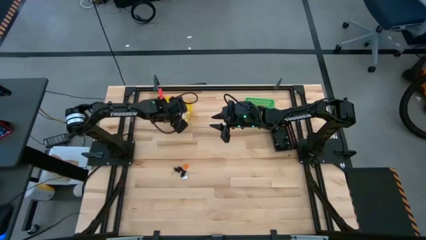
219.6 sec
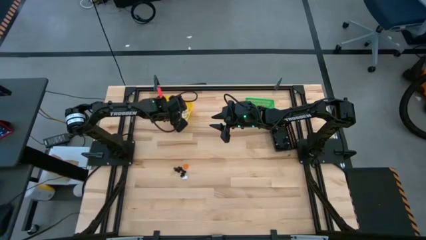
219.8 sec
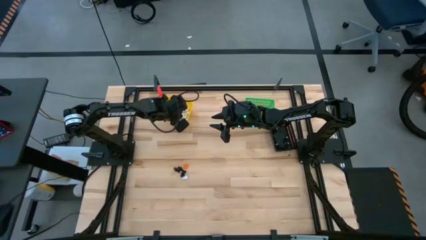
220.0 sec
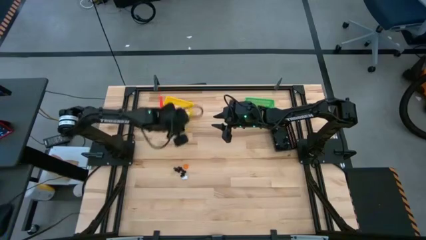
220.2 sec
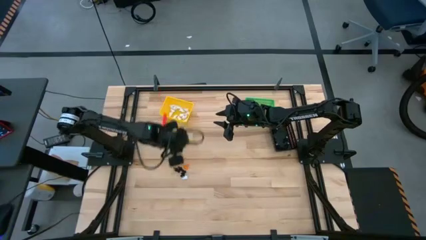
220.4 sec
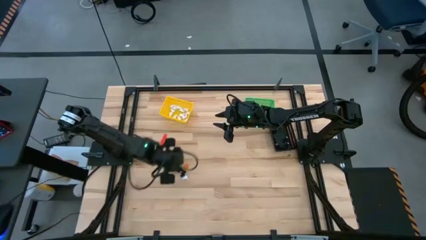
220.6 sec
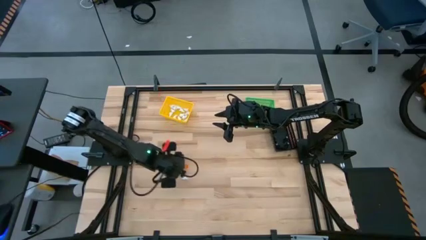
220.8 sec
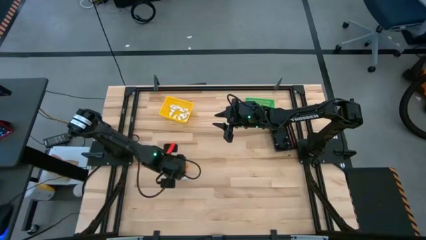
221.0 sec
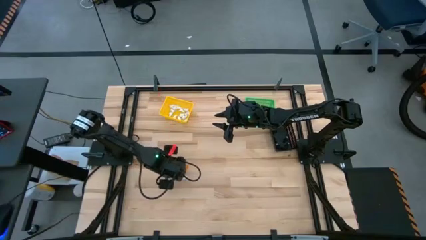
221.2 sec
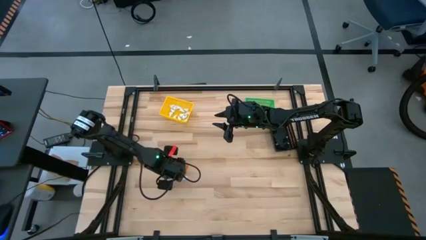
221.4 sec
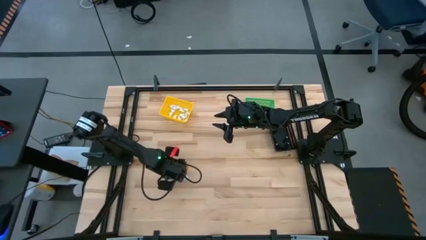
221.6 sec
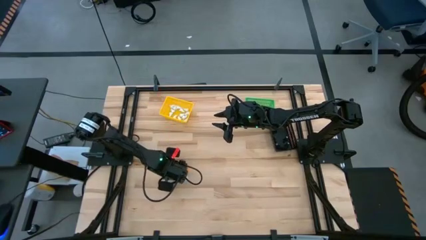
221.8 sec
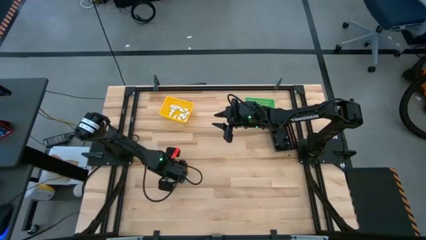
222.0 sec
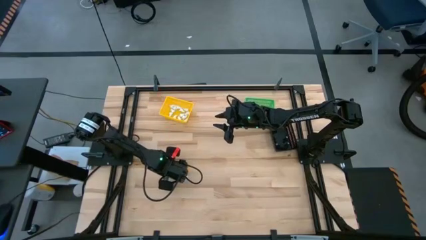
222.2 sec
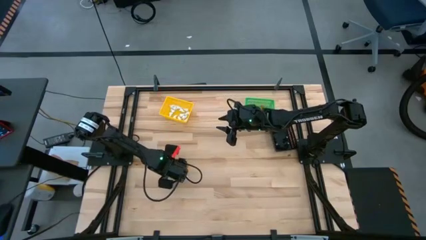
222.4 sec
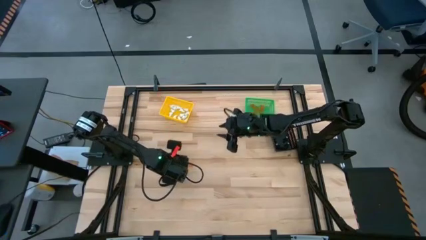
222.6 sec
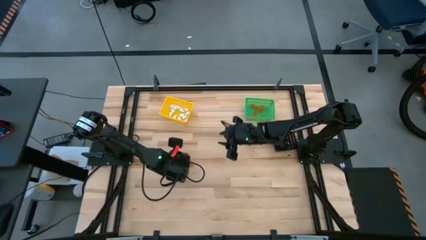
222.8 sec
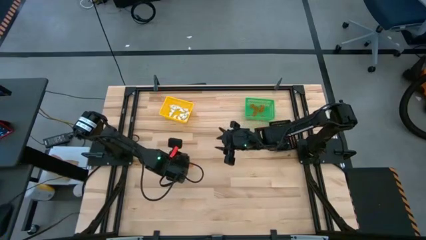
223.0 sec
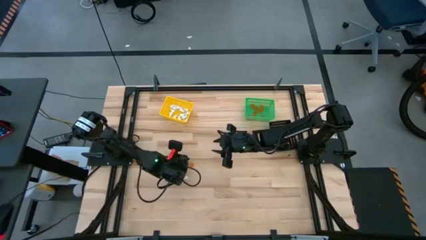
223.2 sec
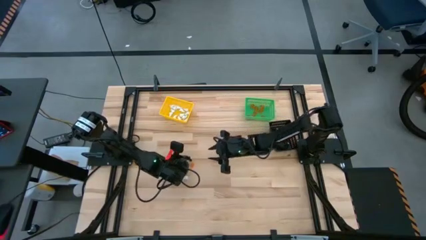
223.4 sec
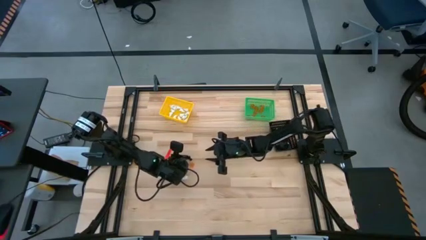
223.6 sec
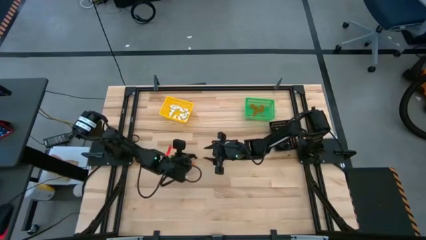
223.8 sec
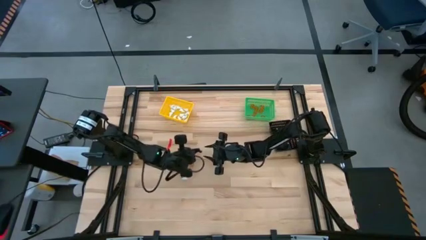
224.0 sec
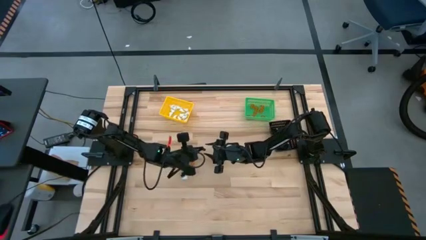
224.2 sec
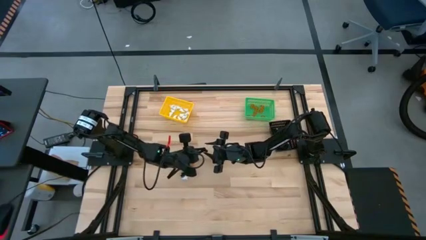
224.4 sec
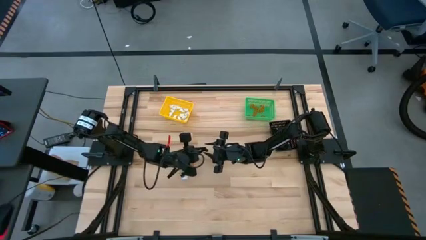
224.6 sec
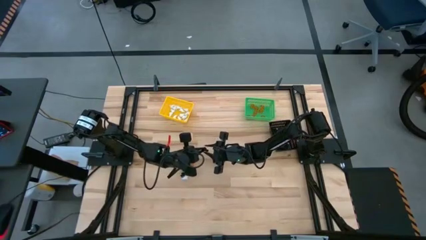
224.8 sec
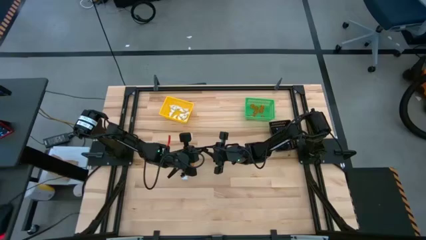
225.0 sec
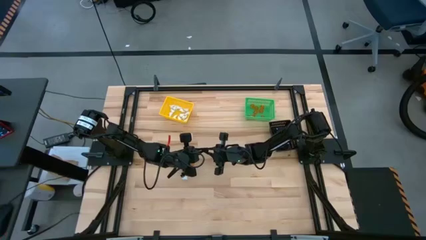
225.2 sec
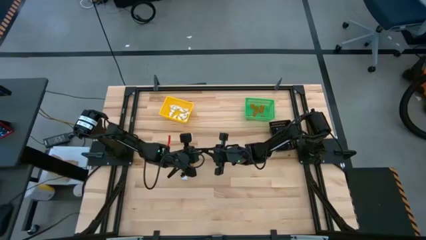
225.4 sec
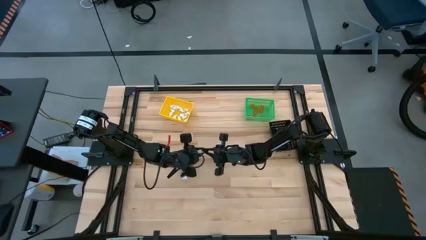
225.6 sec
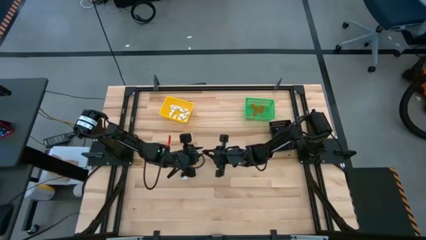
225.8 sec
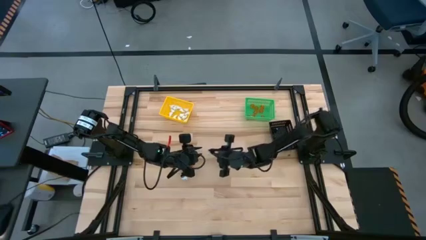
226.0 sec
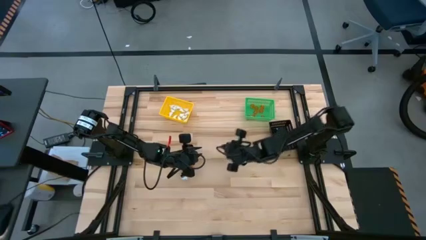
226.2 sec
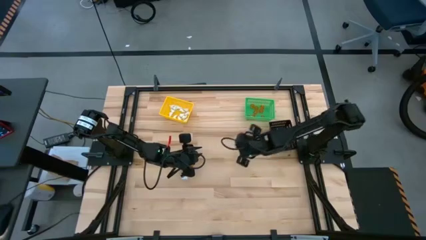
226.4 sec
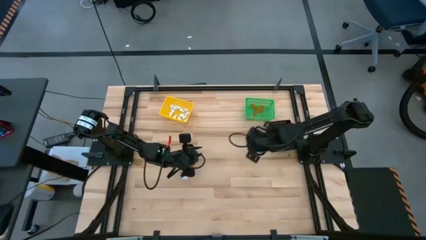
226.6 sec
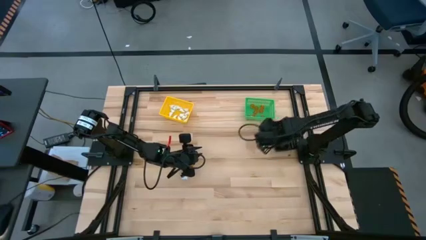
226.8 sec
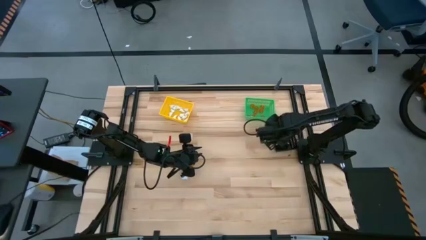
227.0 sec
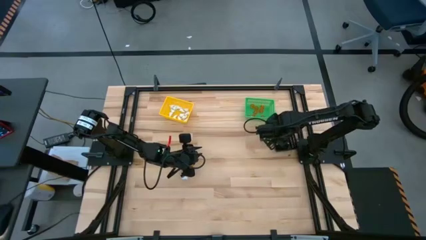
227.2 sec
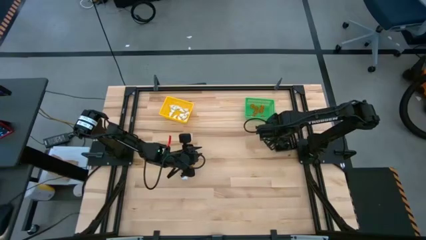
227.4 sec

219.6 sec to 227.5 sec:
Task: Sort Halloween decoration
Put the black skeleton toy into the black bin

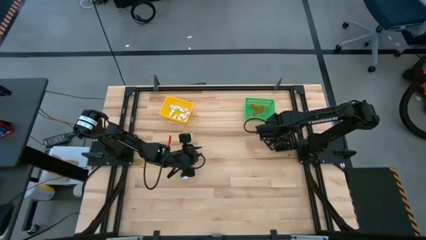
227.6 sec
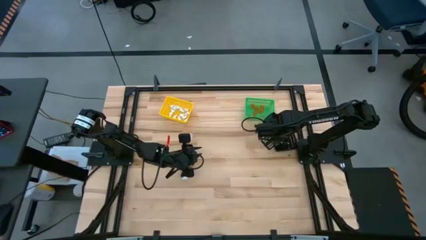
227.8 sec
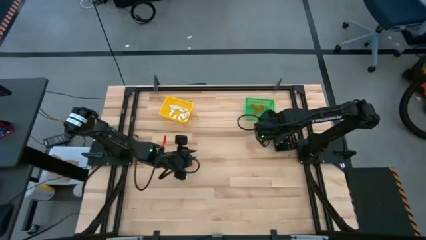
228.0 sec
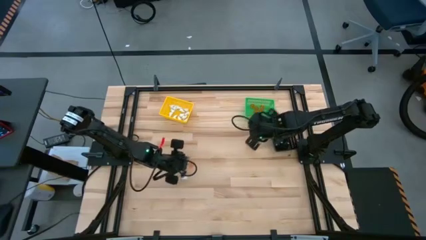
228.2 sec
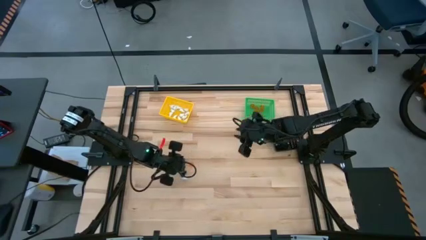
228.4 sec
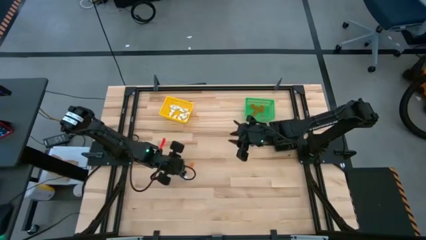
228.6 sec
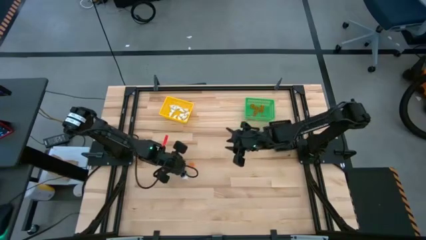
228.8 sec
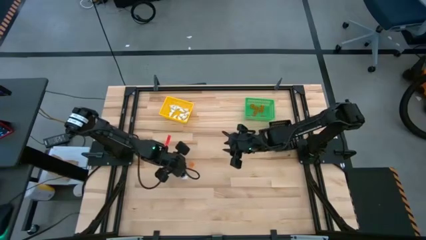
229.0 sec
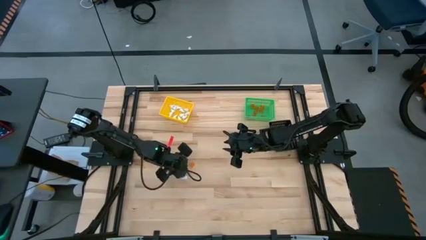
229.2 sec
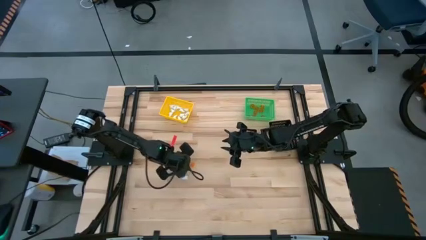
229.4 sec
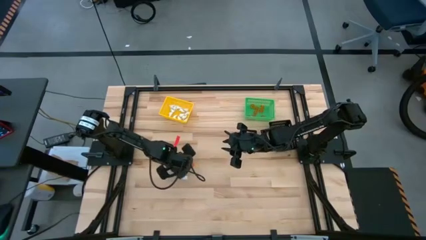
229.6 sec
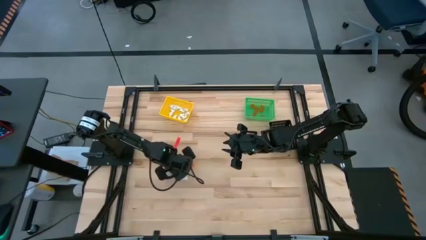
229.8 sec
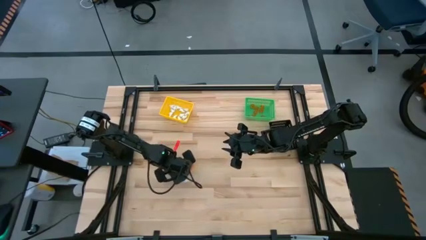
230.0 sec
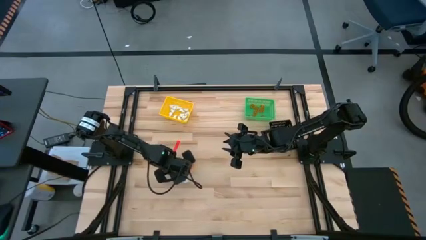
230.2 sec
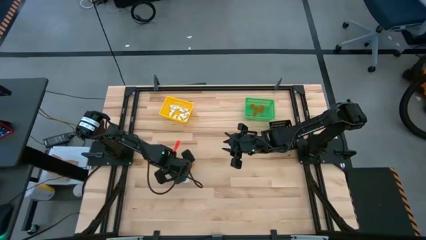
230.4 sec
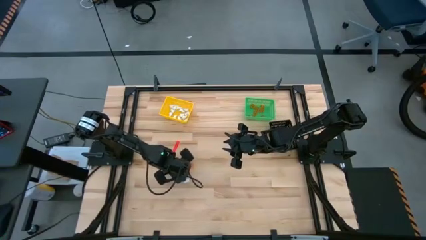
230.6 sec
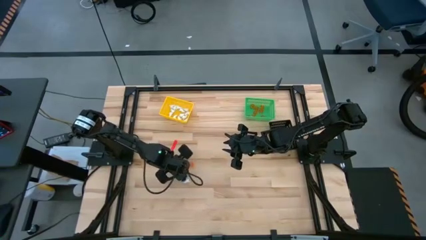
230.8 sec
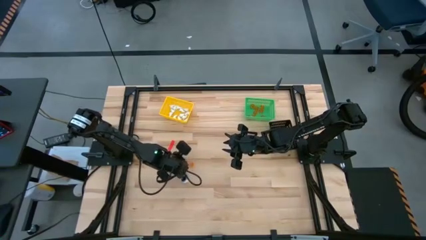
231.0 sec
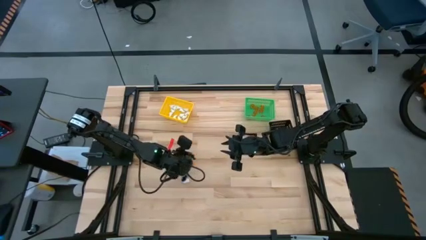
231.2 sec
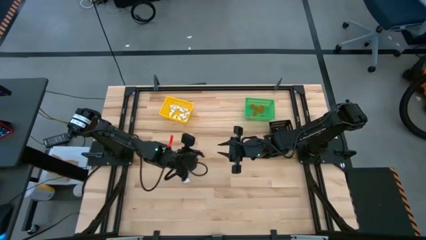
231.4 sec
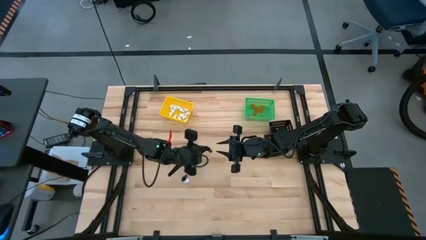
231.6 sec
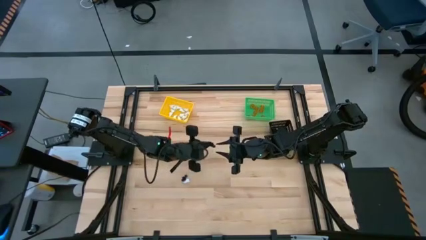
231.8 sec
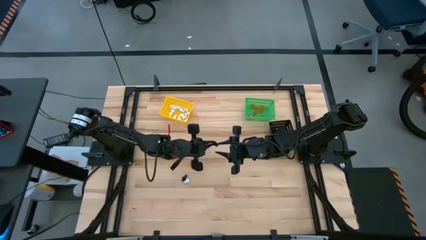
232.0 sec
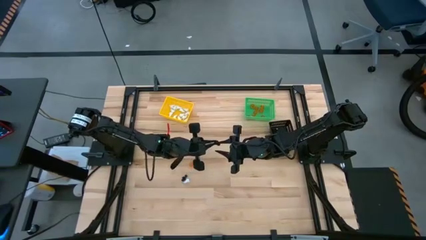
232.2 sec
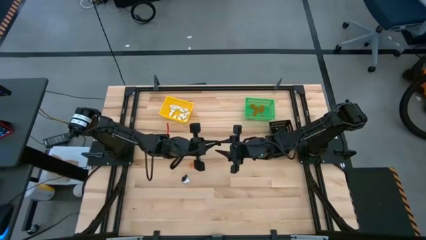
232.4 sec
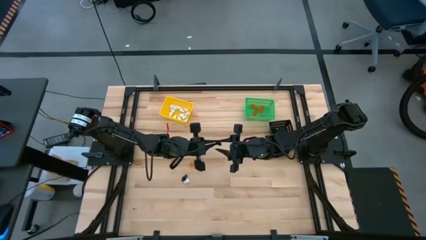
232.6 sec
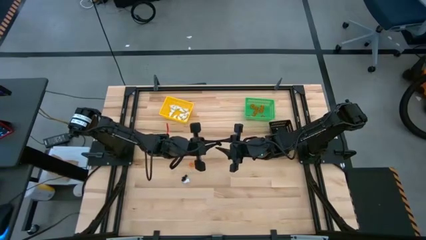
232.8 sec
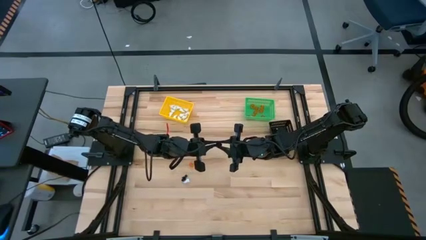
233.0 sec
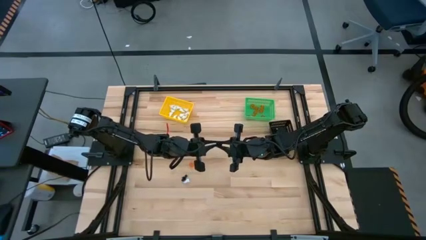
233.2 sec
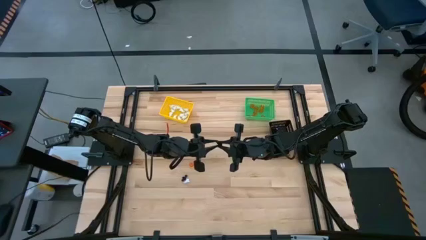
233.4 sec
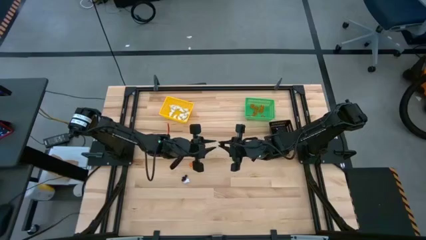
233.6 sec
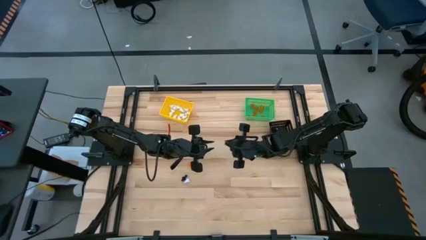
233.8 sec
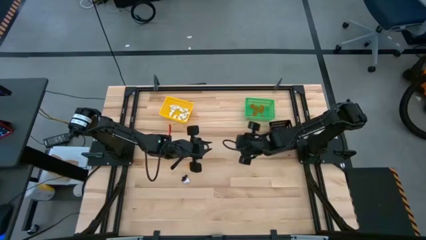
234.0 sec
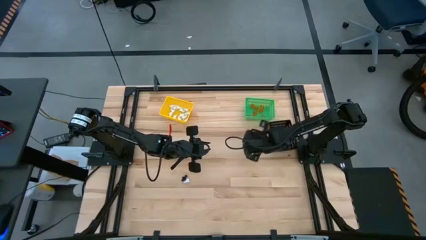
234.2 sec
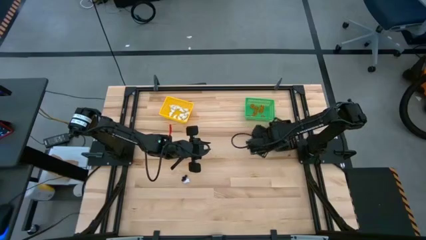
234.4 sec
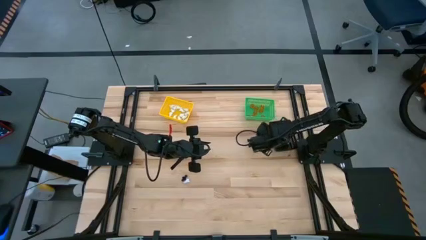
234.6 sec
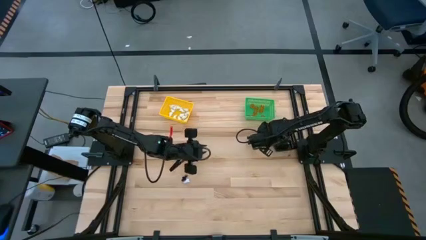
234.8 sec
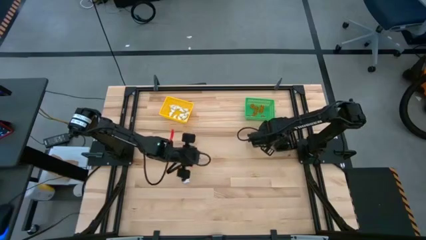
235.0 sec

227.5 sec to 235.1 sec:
Put the black skeleton toy into the black bin

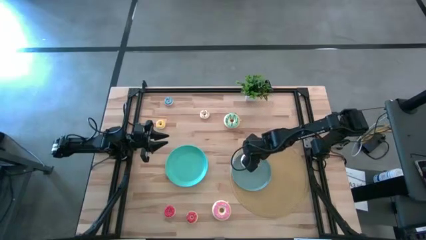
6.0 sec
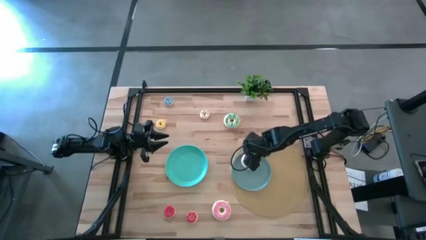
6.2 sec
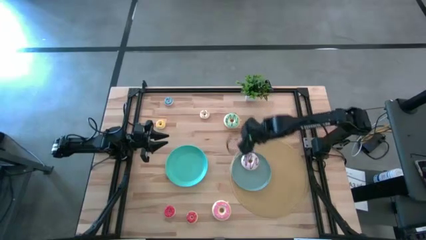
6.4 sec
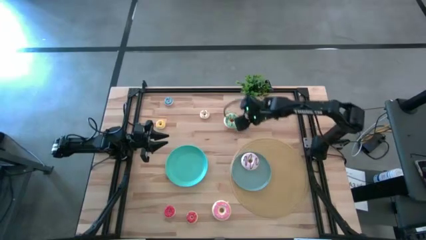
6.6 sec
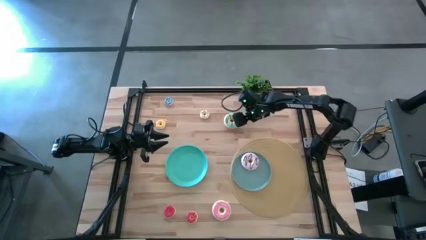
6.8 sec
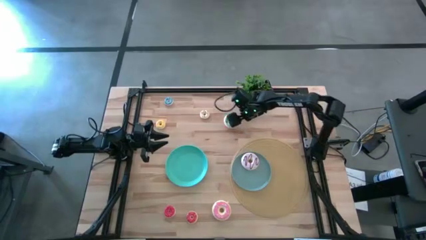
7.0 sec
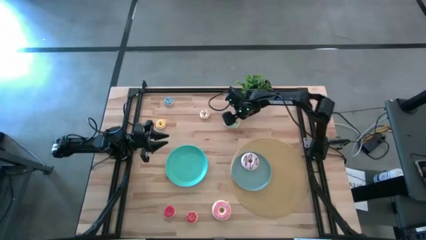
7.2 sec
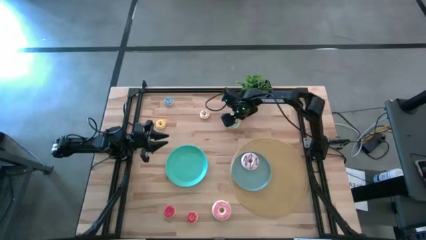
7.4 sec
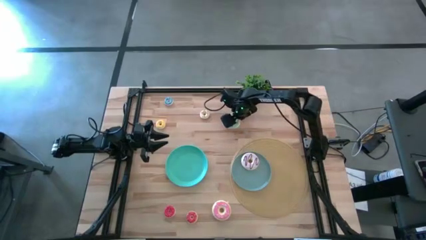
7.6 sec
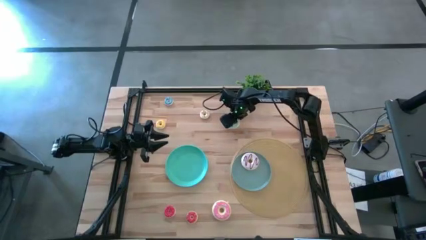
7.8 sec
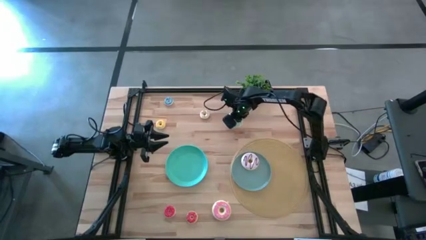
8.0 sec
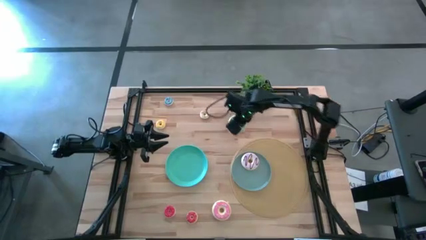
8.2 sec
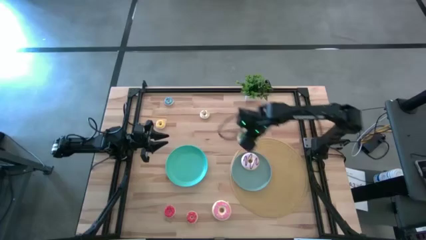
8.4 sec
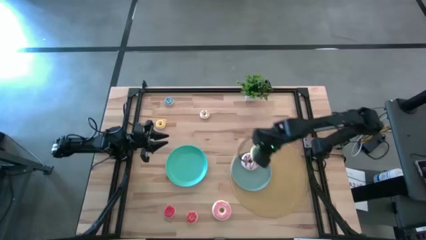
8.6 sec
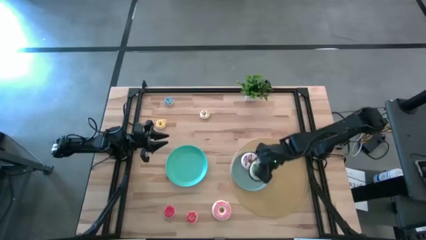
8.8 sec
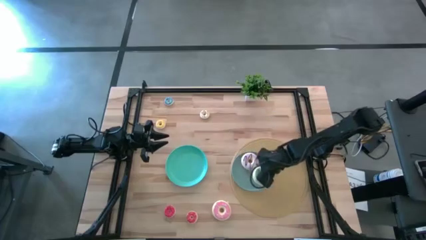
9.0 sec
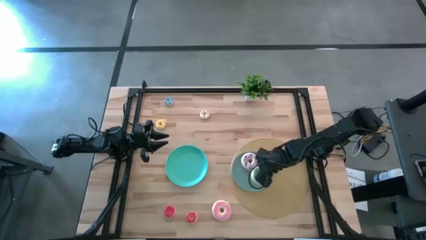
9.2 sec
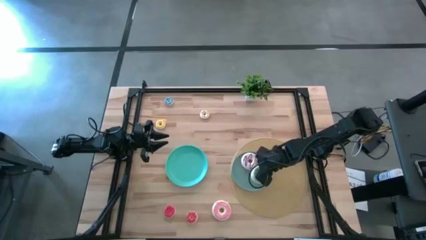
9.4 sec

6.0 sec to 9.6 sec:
Task: Pick & Place donuts
Put the large green donut on the gray plate
